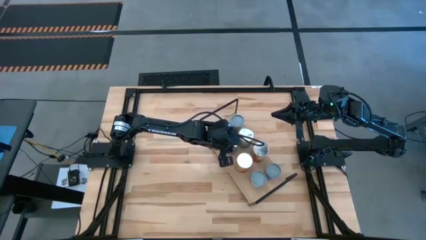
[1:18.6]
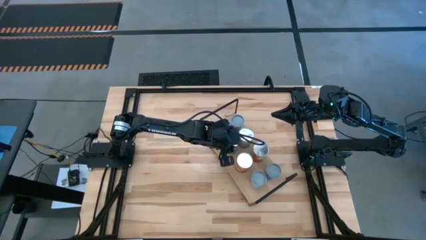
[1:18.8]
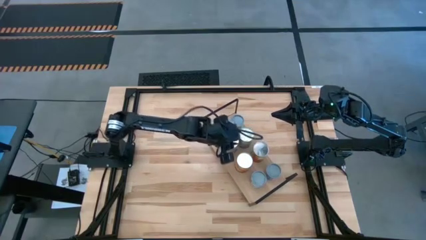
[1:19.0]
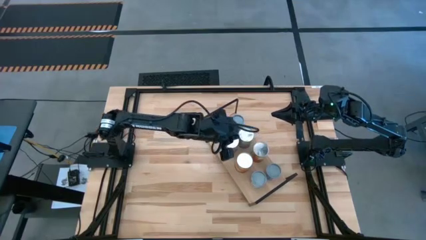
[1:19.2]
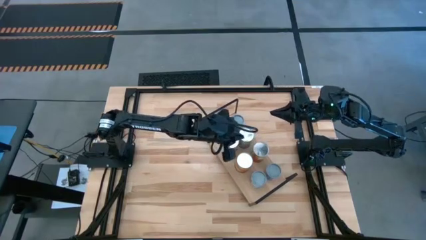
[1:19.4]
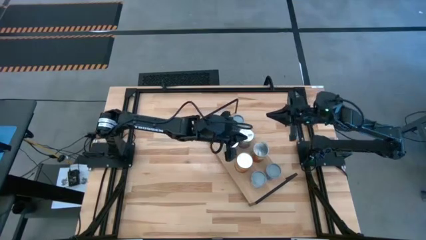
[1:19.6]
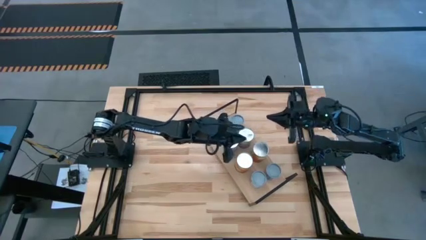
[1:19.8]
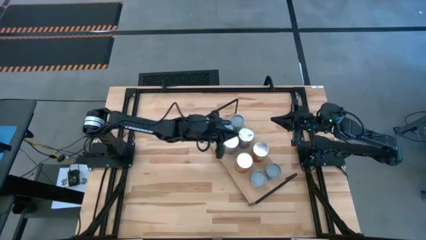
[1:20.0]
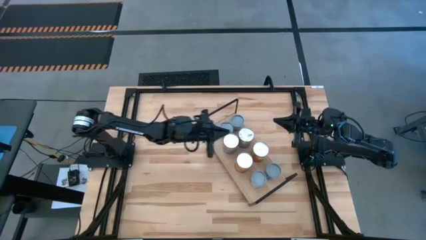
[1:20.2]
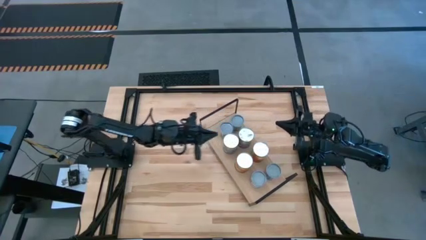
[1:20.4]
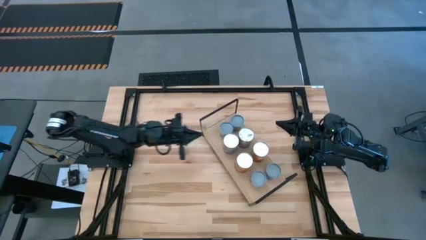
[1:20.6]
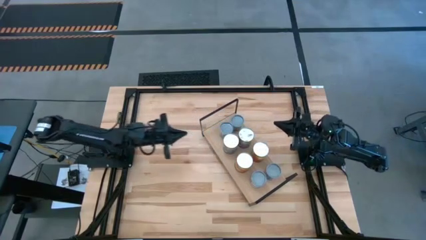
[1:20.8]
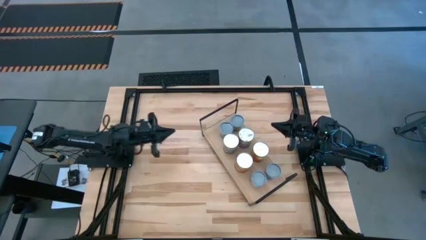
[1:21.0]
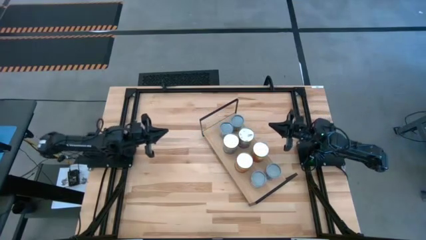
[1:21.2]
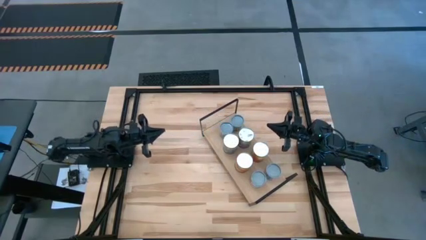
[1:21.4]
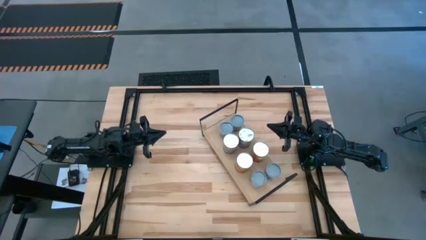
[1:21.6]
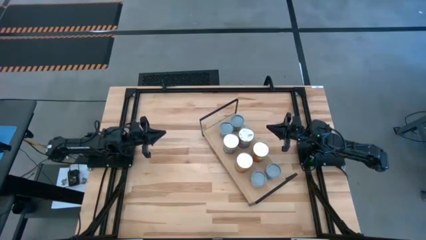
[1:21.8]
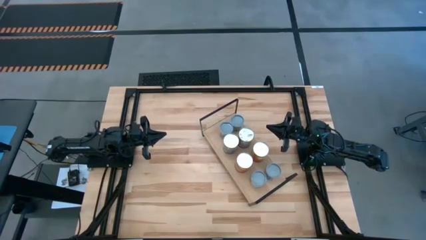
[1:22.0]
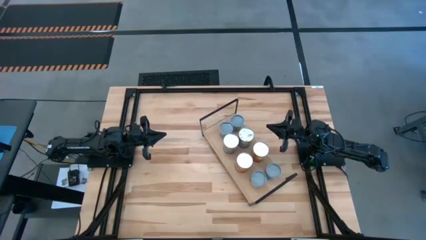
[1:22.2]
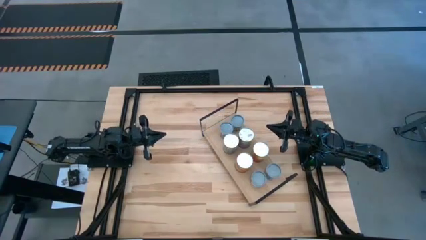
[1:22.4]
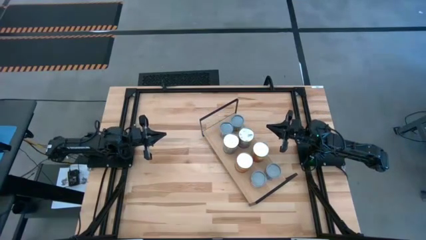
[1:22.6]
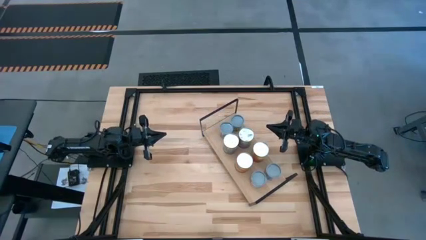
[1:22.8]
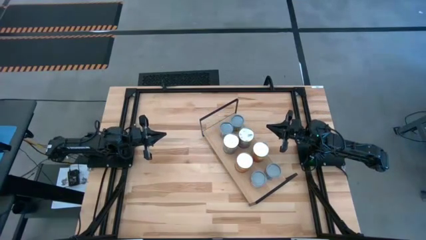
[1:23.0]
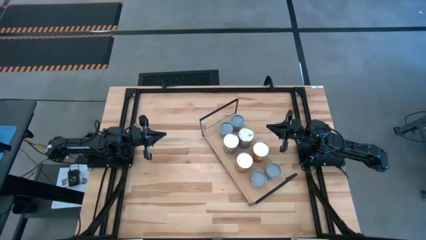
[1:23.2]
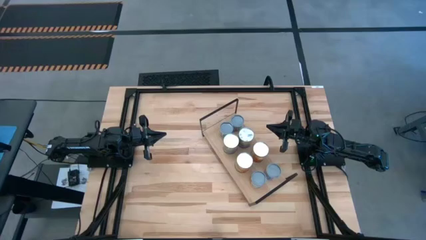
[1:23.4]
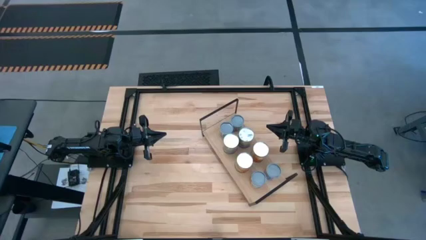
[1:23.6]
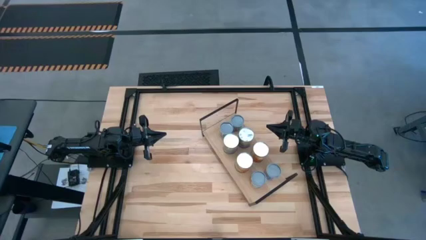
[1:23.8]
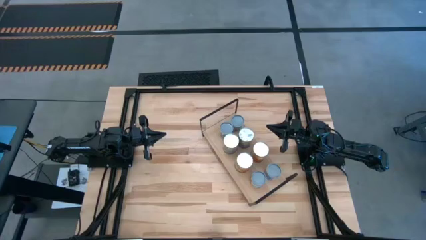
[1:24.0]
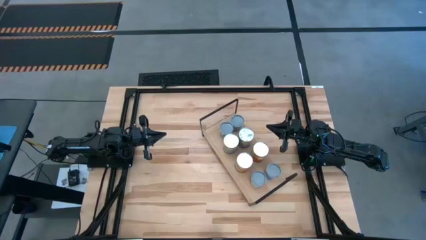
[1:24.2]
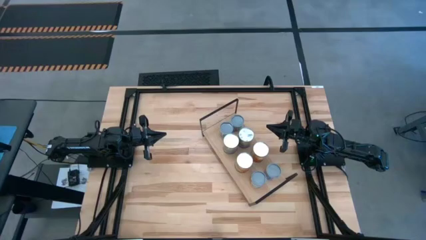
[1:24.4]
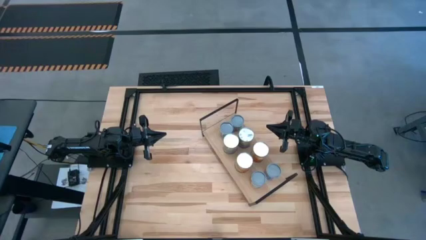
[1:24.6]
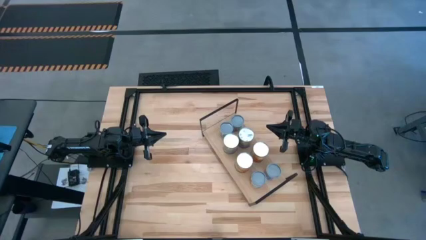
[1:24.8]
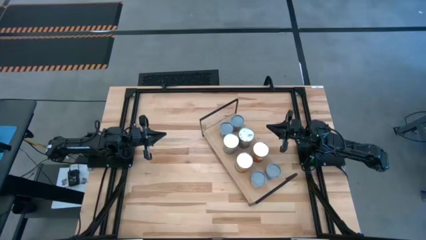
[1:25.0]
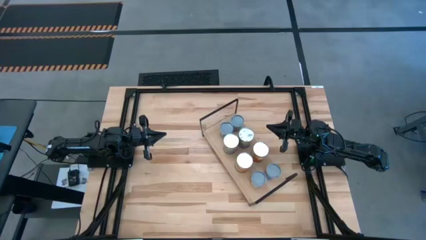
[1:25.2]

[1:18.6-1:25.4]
Task: Pick and place cans onto a shelf
Return to Home Position

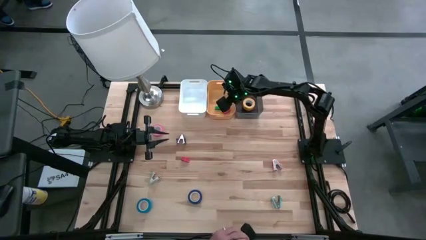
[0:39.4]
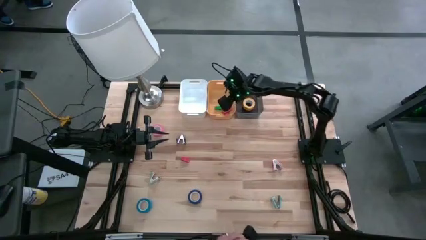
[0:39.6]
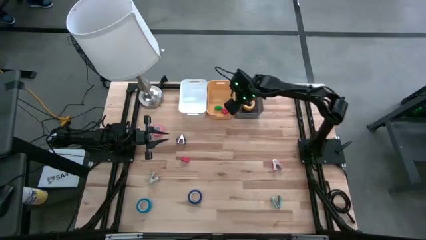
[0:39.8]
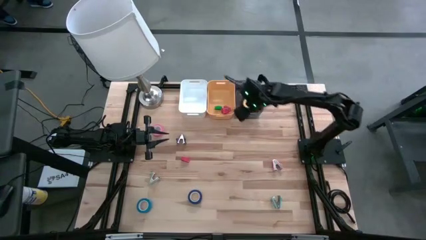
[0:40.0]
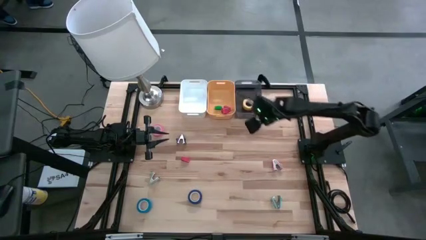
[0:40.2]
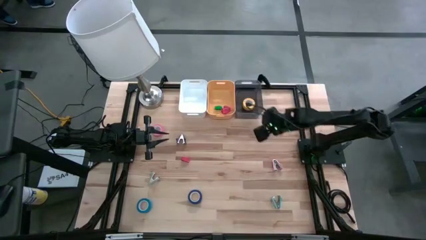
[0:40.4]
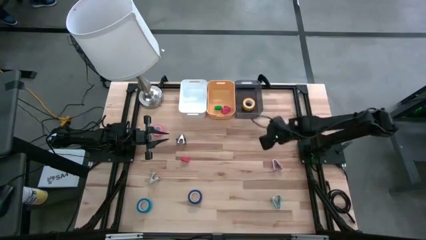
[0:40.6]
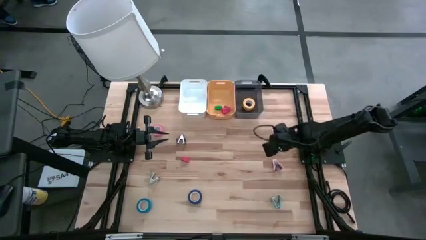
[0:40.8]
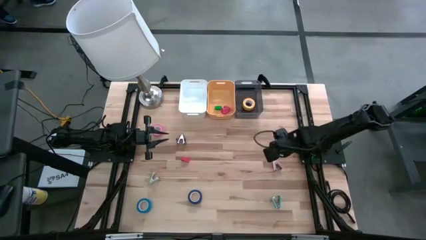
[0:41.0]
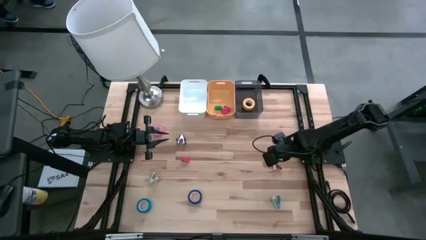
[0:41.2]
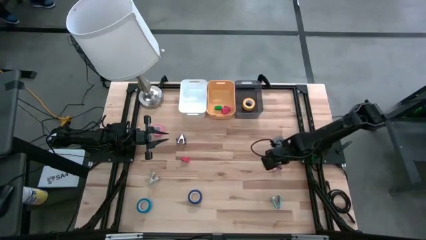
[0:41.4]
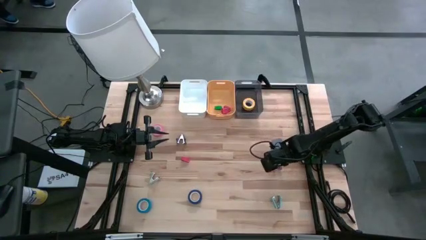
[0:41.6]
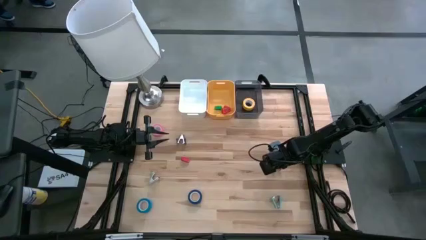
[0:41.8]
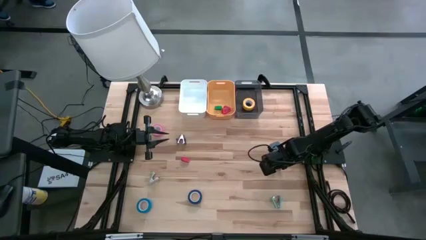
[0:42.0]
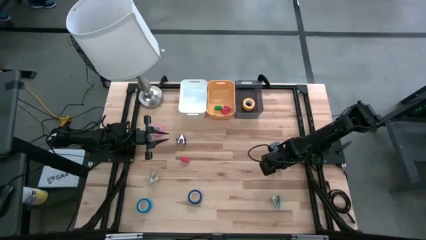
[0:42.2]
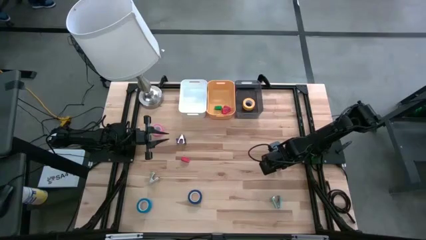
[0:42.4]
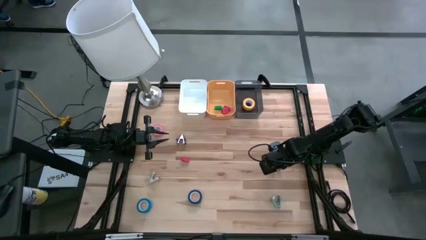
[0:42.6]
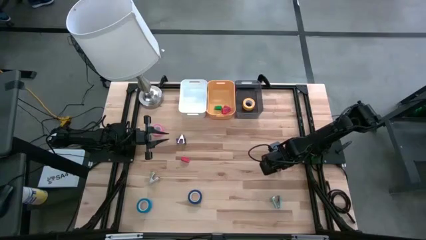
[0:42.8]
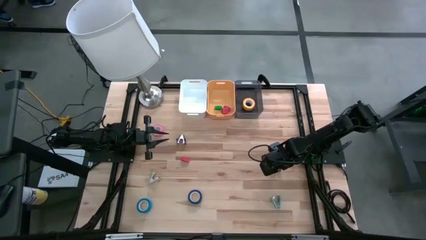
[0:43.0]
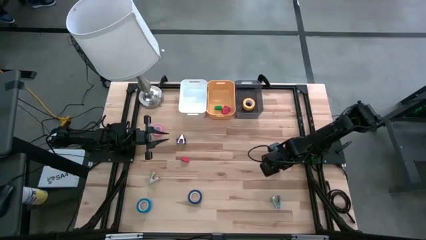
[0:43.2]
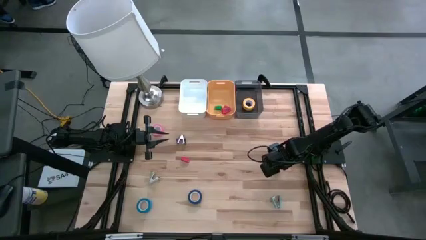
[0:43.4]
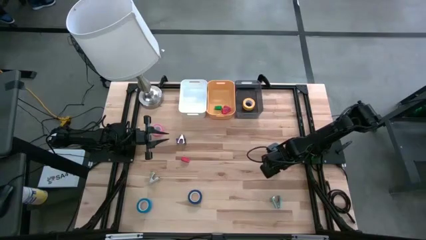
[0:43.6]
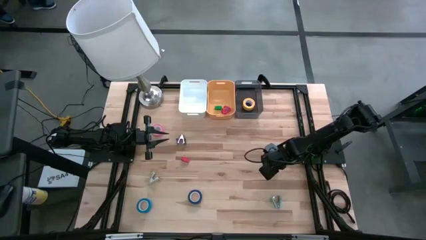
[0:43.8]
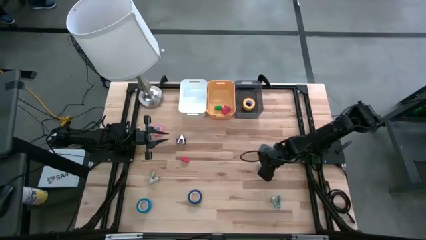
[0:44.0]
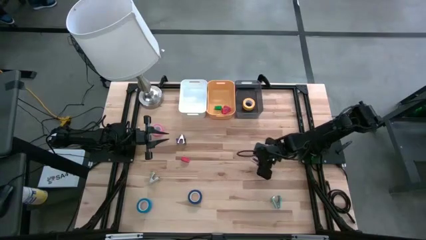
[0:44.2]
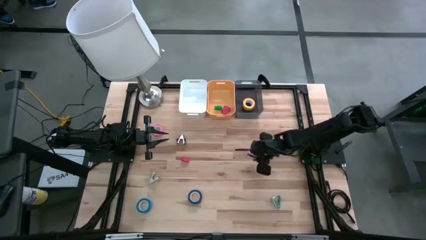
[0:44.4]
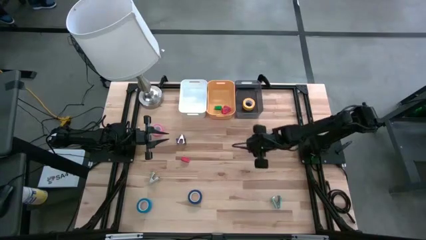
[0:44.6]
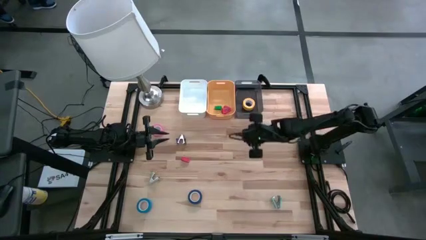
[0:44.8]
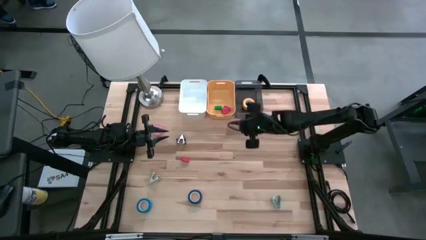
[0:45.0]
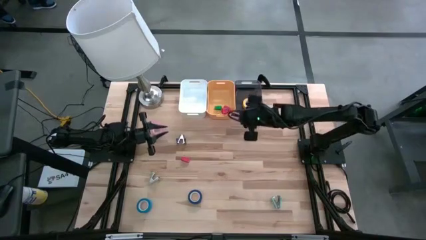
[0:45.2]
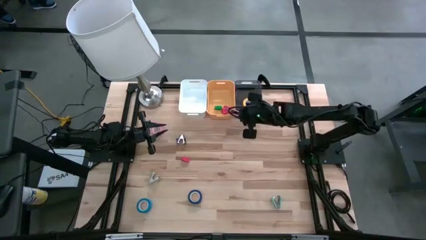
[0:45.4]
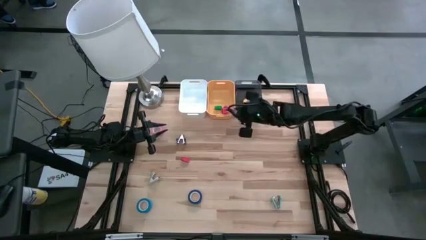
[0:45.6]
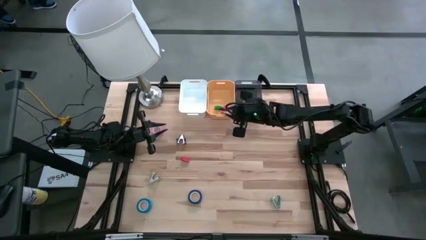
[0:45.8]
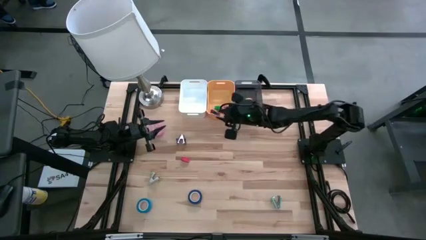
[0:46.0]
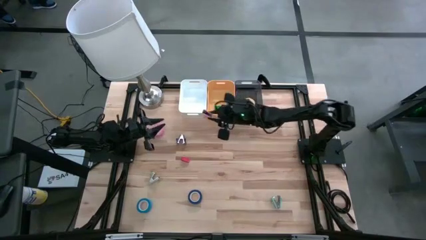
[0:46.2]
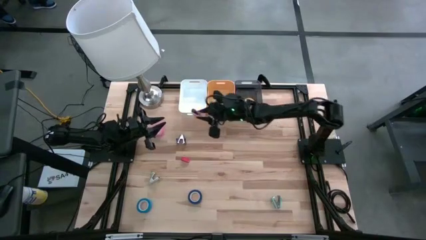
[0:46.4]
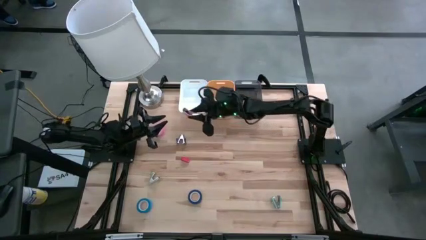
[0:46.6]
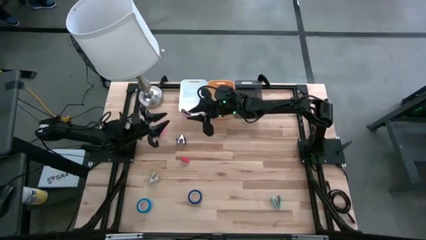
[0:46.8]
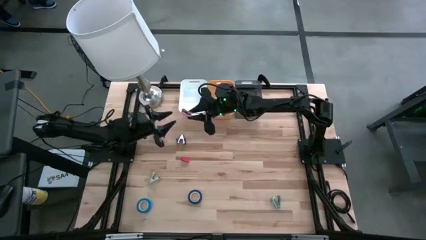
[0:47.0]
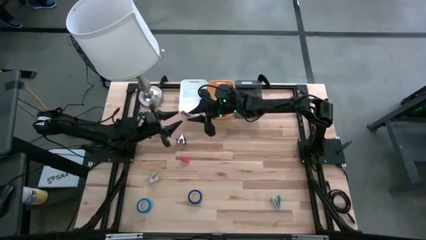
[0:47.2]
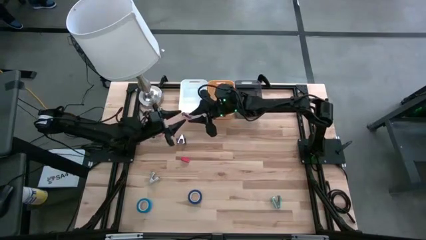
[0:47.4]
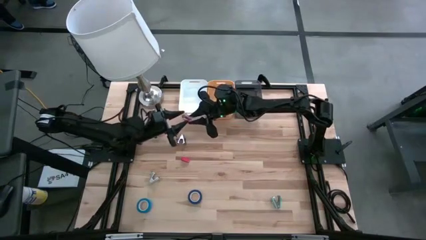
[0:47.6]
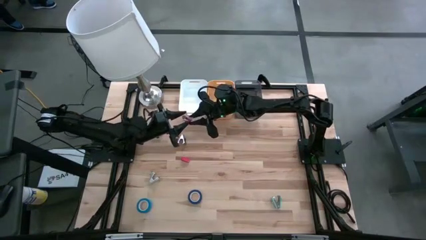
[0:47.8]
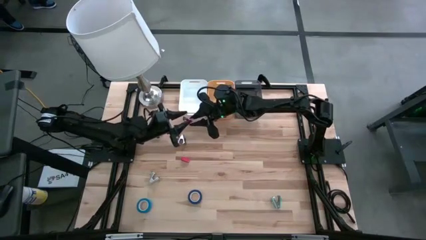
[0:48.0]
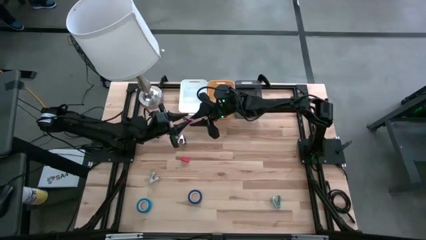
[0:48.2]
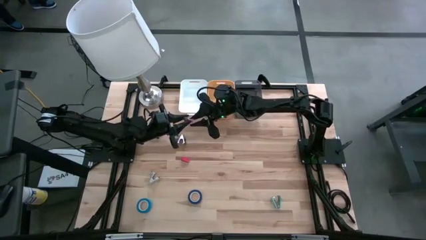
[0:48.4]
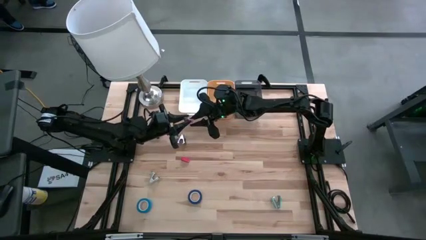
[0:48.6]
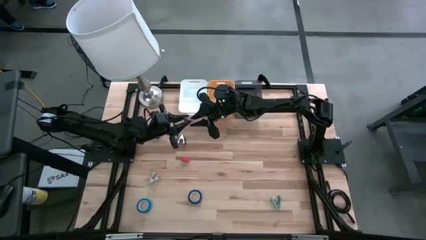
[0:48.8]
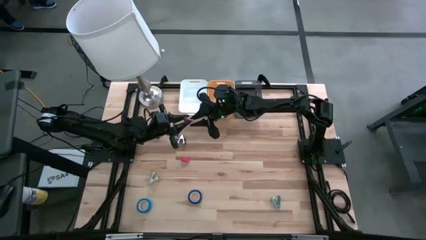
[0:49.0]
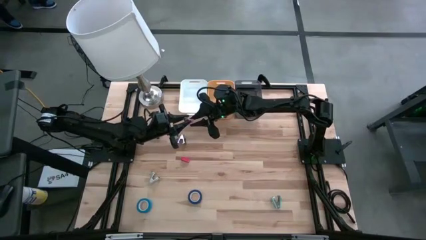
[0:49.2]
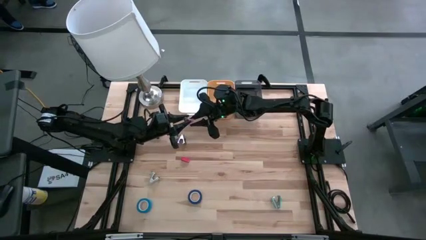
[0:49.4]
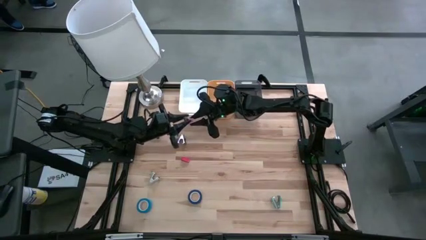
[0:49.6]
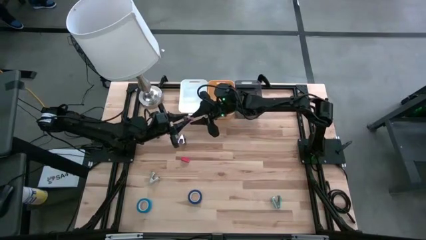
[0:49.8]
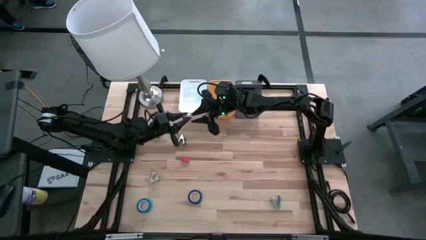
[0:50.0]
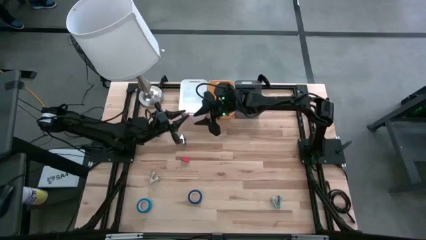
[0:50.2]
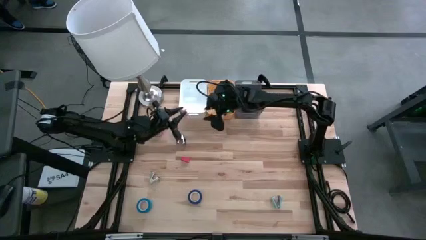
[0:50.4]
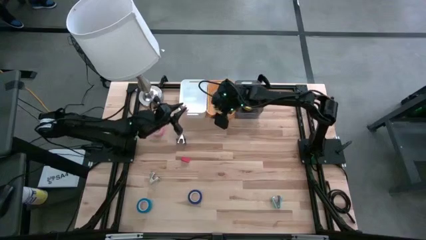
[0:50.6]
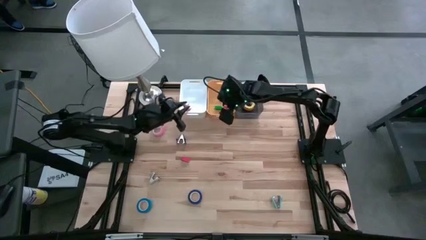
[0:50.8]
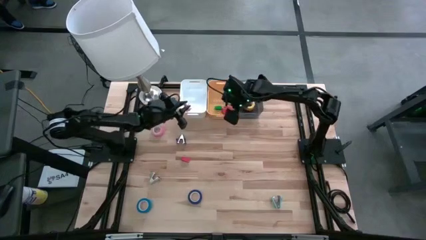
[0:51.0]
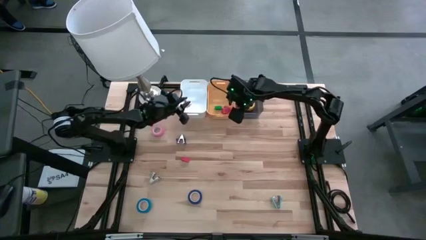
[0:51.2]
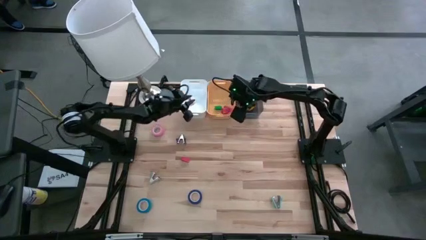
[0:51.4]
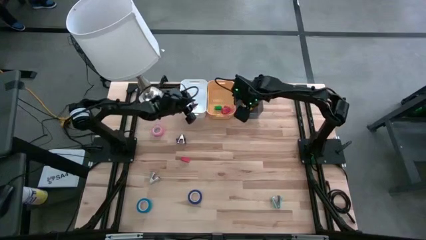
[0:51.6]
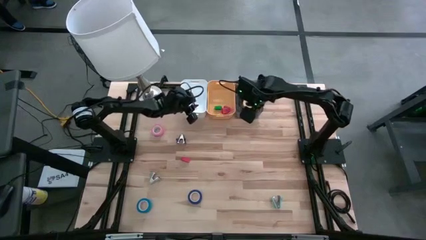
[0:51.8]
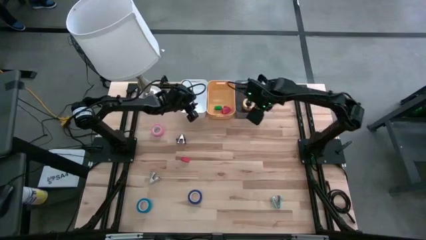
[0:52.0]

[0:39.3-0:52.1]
Task: Pick and place Stapler, Stapler remover, tape
Put the pink staple remover into the white bin
